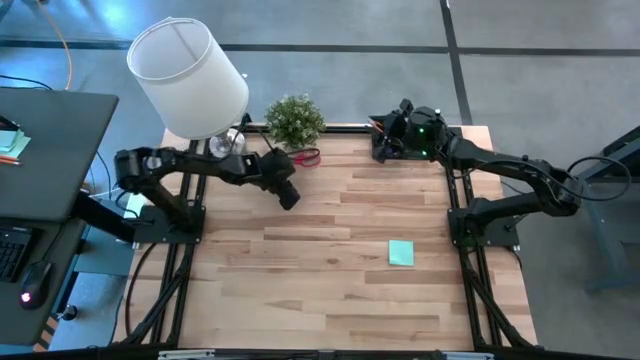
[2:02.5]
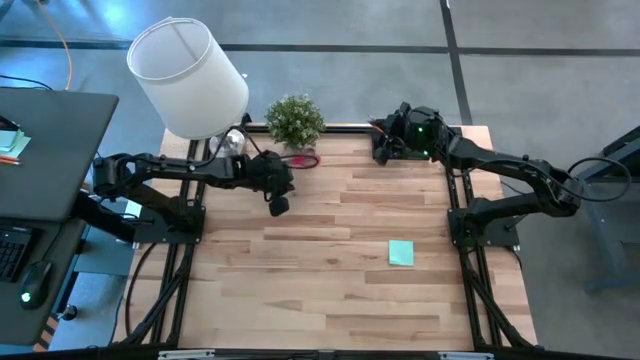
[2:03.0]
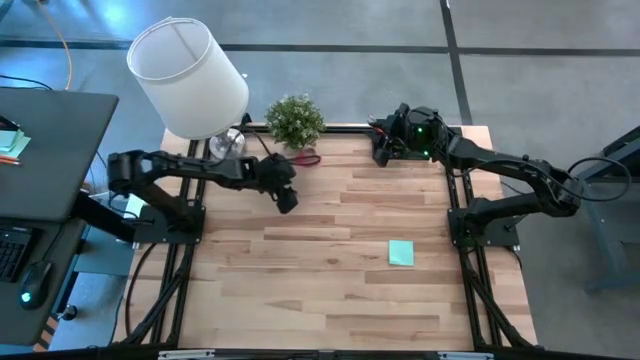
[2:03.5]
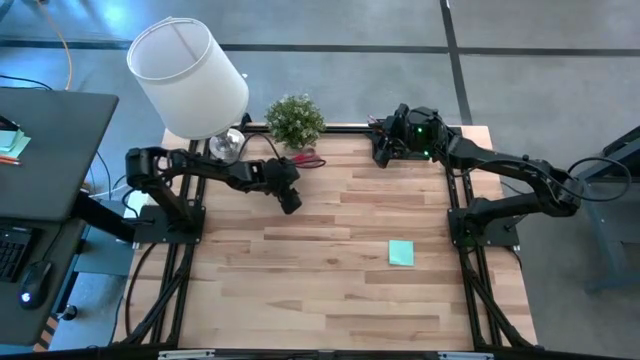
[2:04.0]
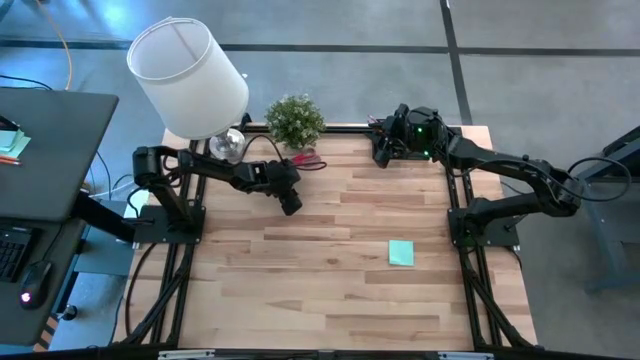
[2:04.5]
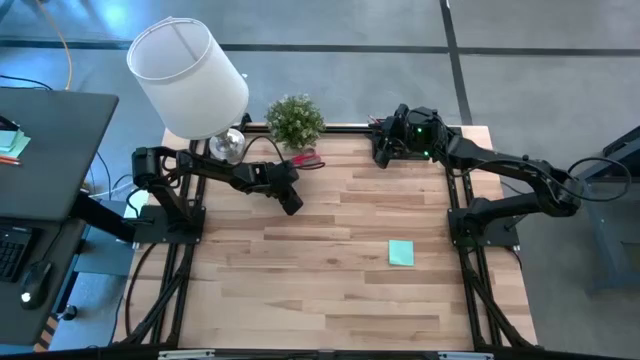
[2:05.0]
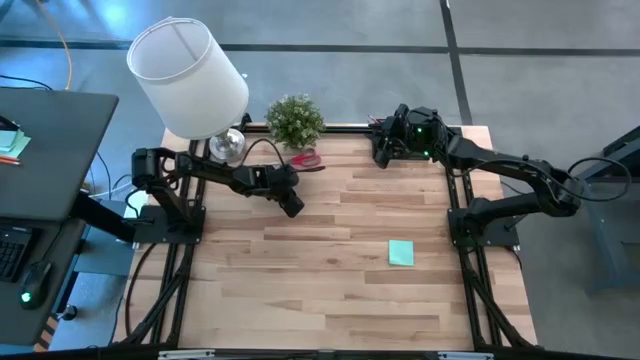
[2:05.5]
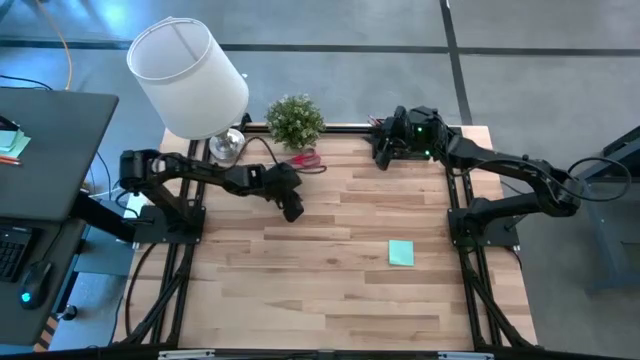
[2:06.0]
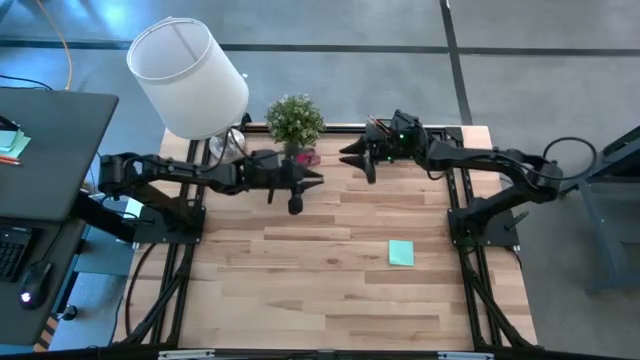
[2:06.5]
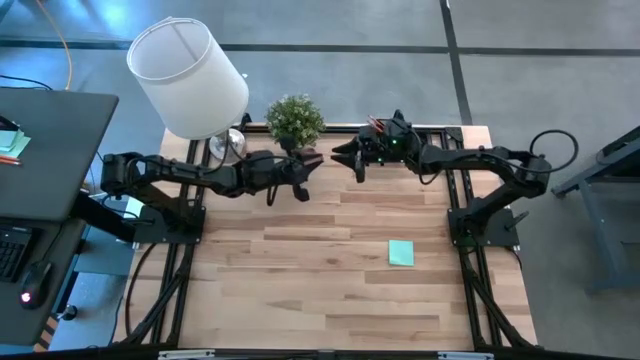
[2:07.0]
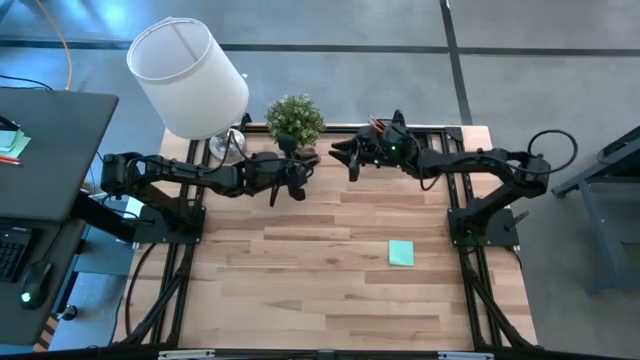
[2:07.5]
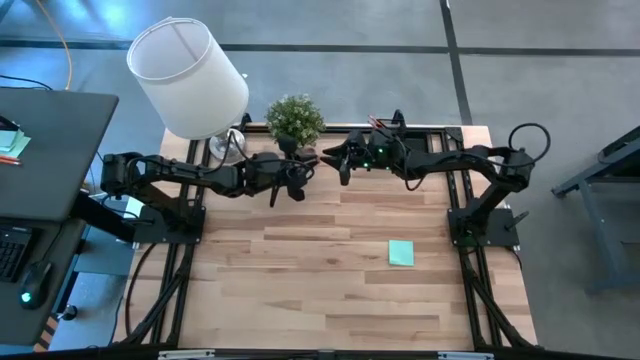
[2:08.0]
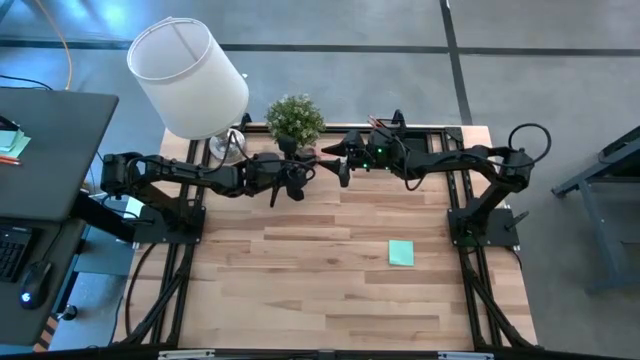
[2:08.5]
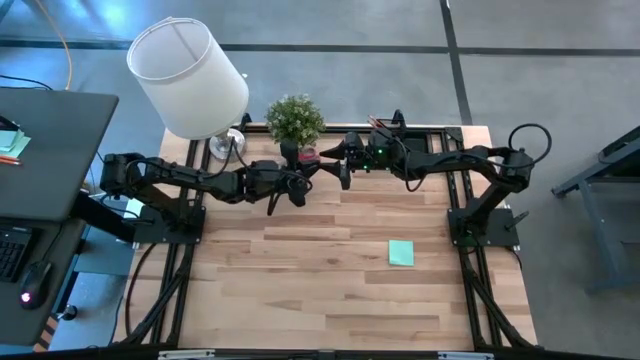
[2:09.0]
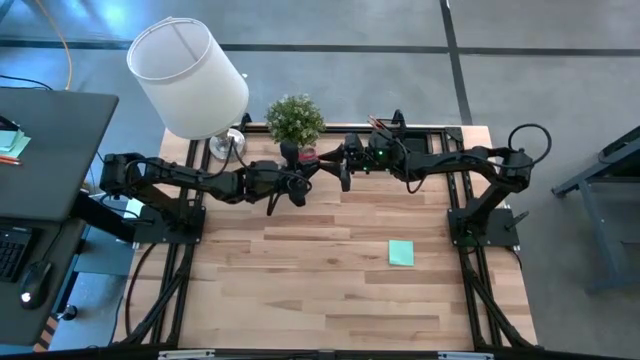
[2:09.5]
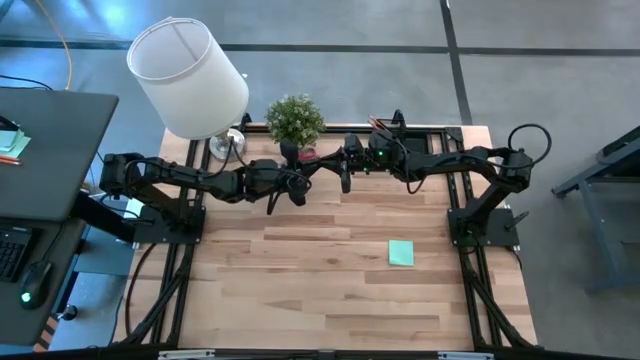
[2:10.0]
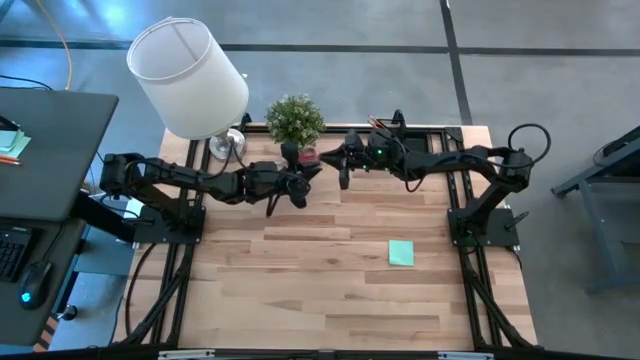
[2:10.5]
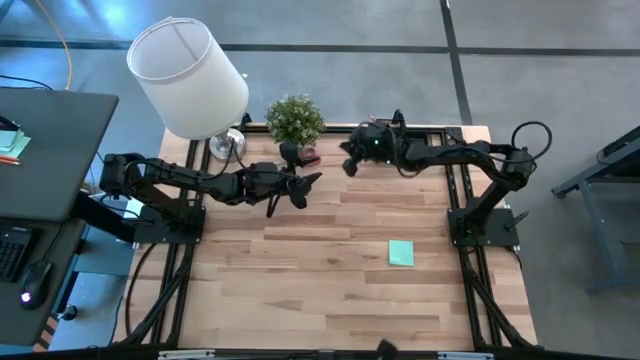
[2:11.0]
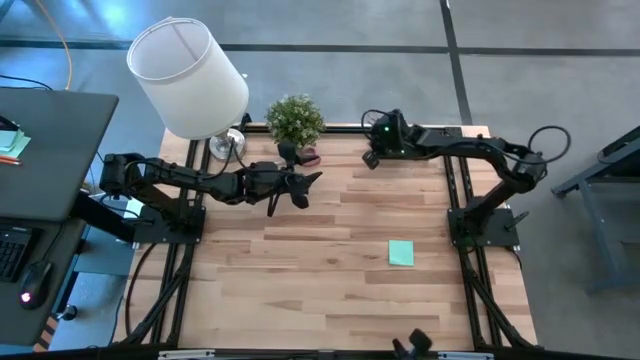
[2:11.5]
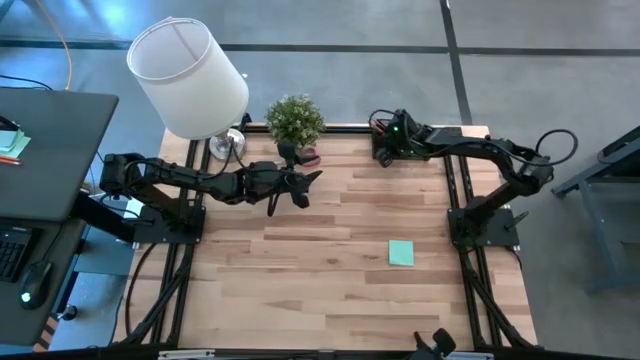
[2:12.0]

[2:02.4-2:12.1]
Task: Pick and place office supplies into organizer
Put the light blue binder clip in the black desk organizer

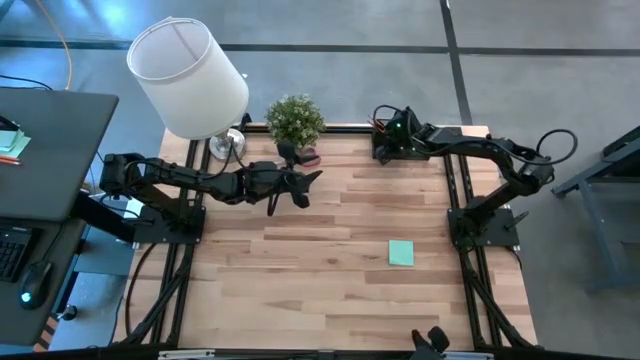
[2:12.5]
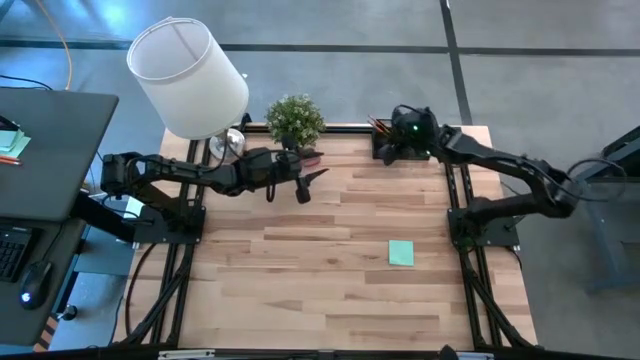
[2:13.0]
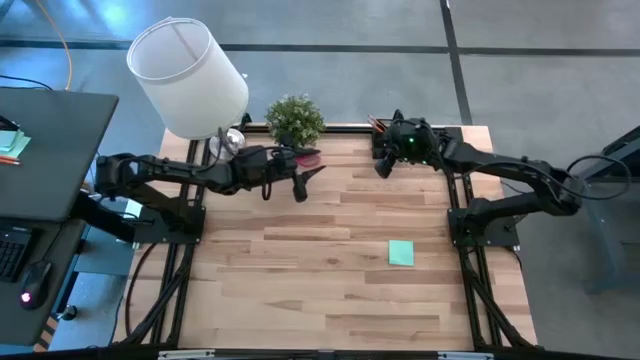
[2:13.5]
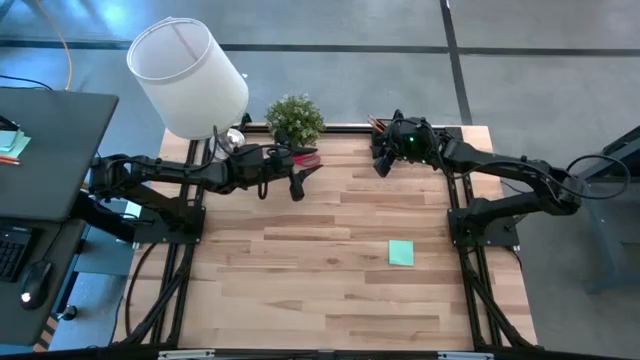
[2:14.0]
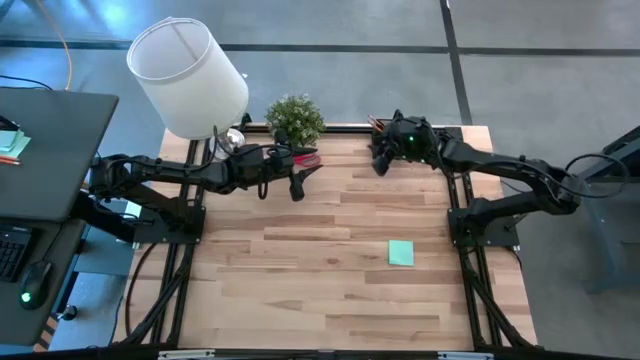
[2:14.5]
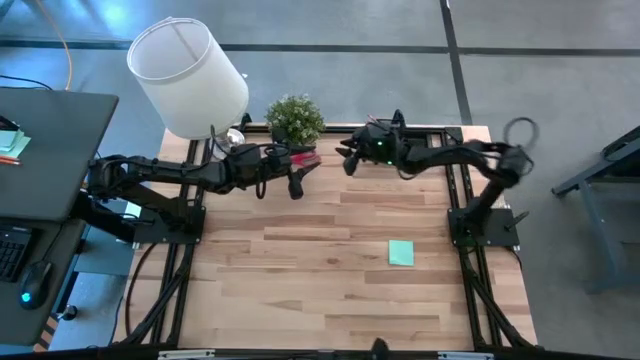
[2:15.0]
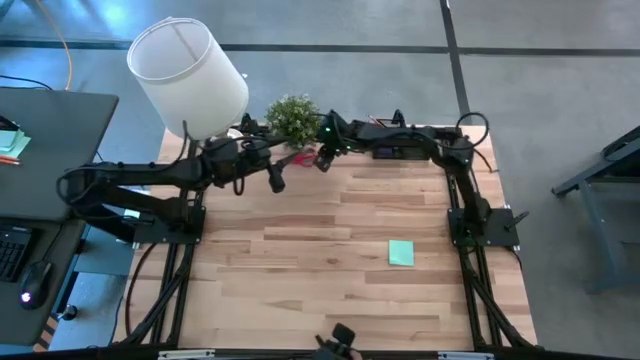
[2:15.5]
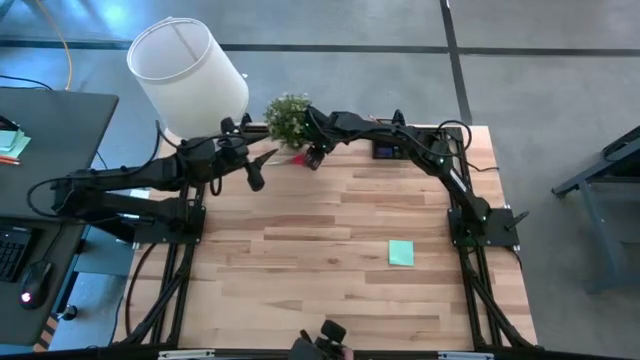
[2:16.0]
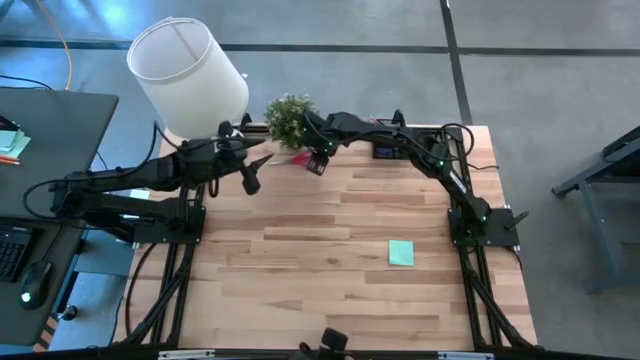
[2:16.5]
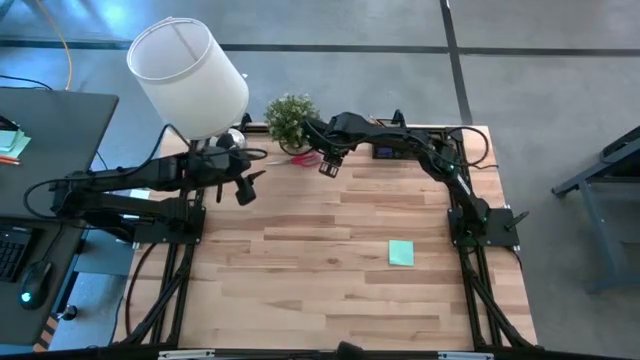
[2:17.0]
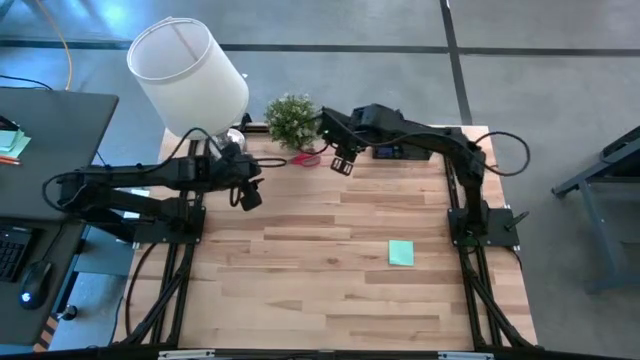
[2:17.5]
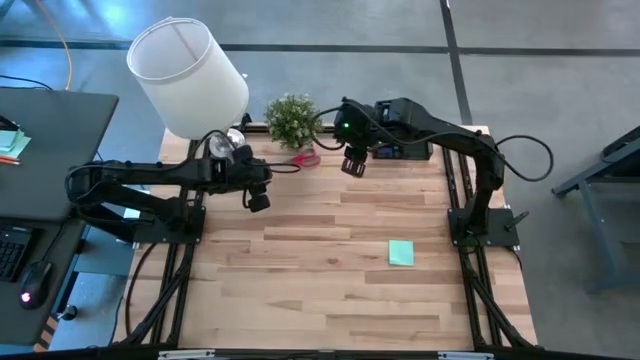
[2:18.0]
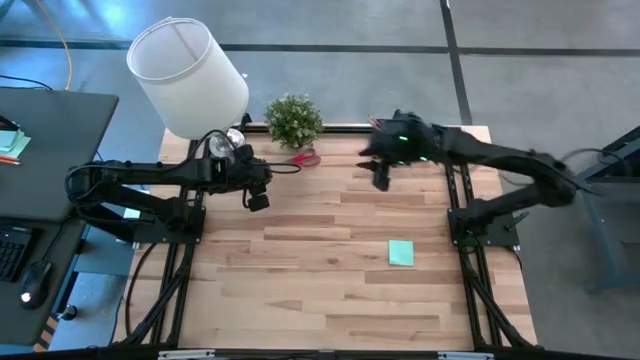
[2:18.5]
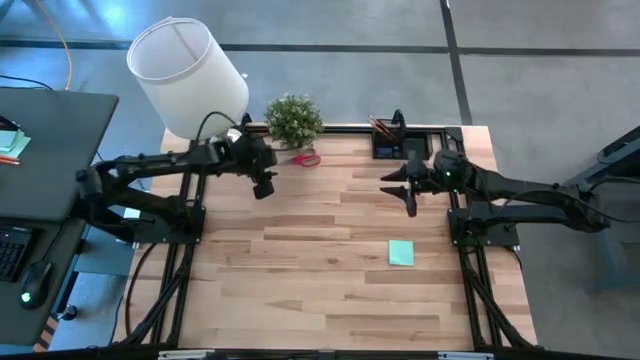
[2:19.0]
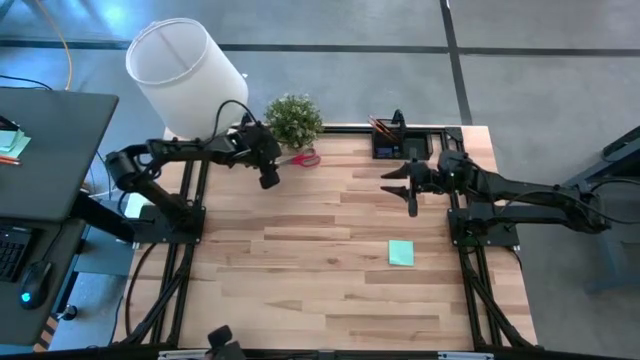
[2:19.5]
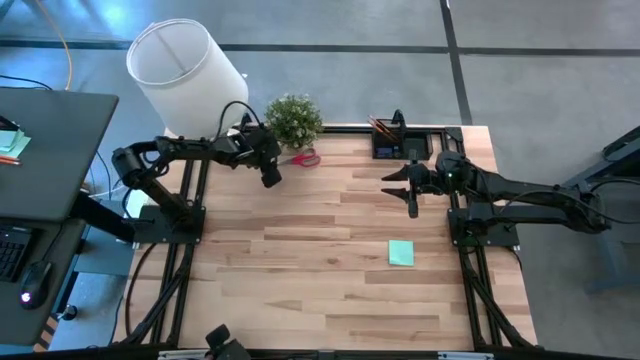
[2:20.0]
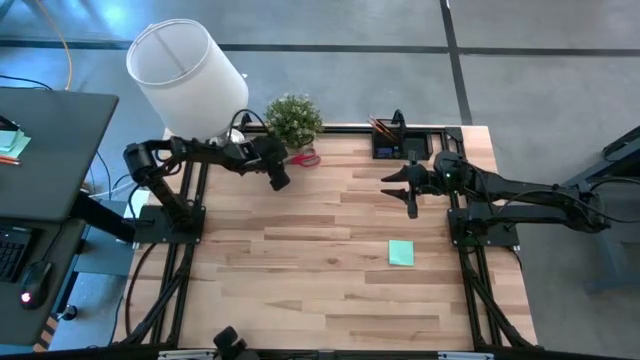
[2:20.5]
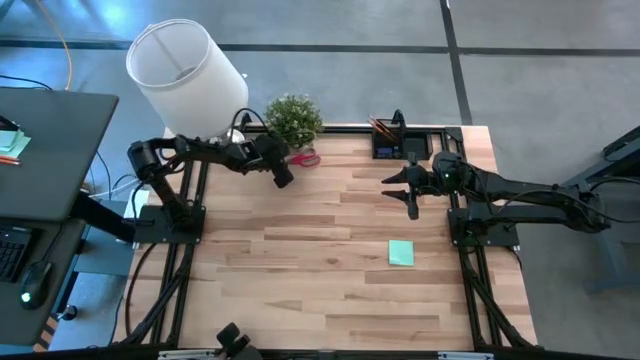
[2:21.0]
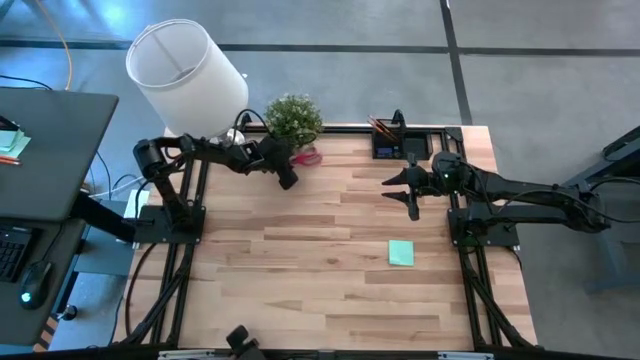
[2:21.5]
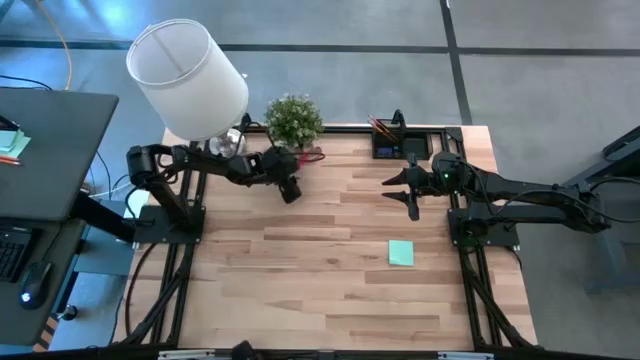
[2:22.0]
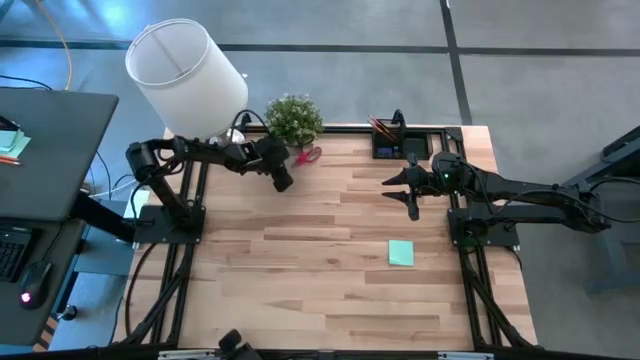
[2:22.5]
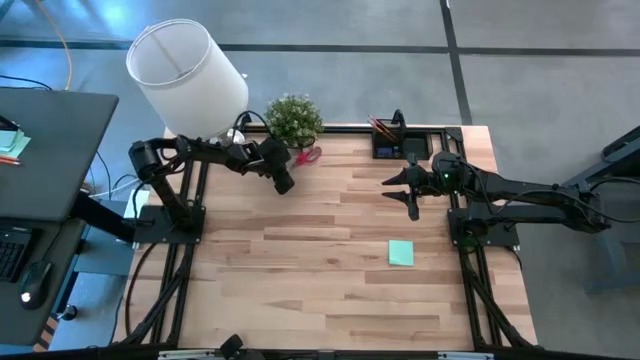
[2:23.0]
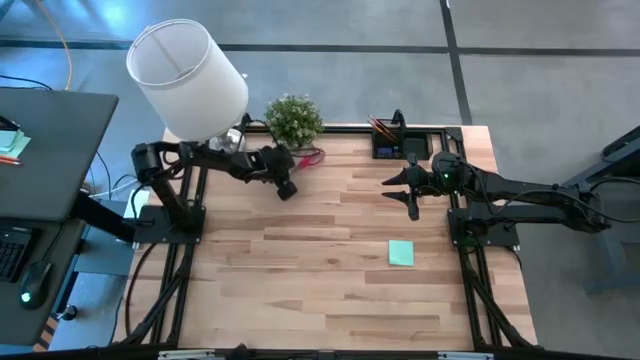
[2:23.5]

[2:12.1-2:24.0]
Put the red scissor in the black desk organizer
